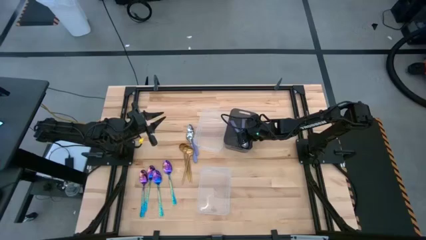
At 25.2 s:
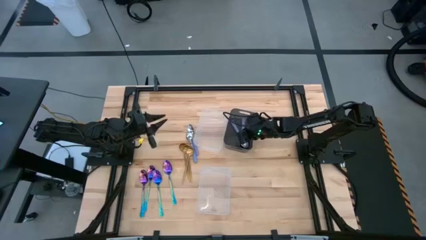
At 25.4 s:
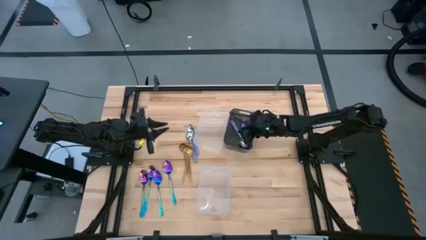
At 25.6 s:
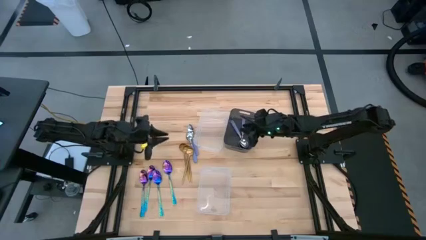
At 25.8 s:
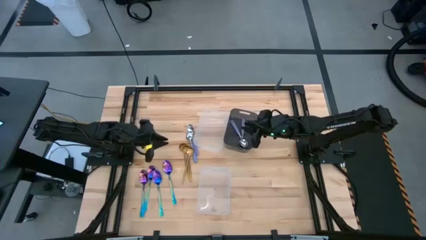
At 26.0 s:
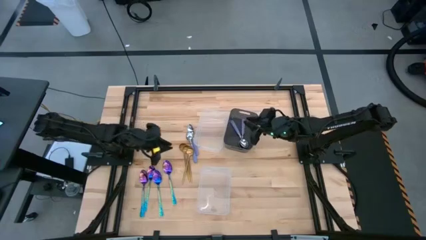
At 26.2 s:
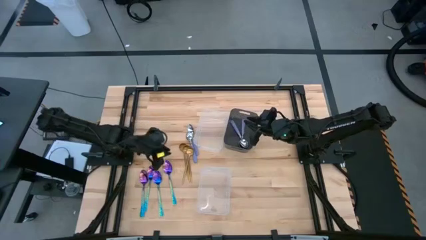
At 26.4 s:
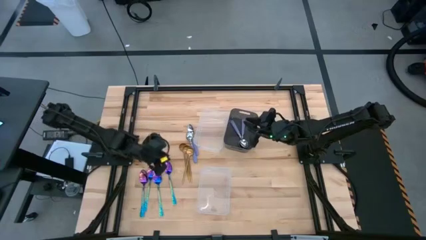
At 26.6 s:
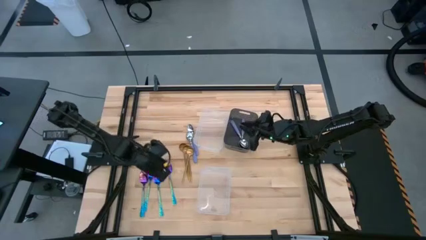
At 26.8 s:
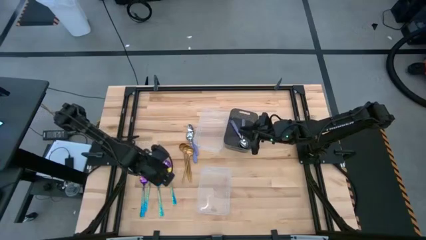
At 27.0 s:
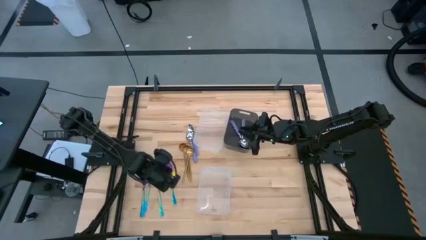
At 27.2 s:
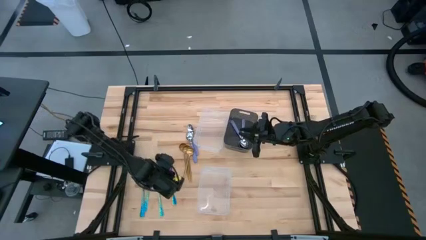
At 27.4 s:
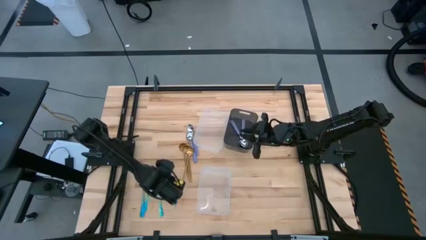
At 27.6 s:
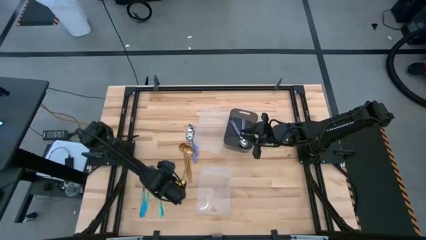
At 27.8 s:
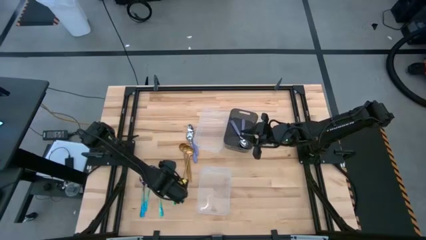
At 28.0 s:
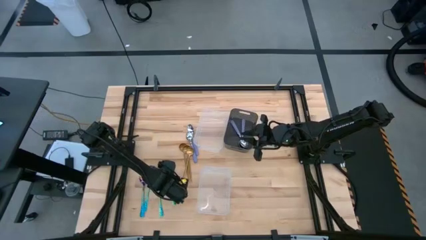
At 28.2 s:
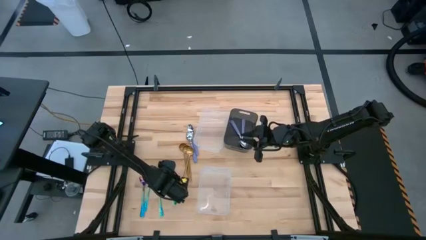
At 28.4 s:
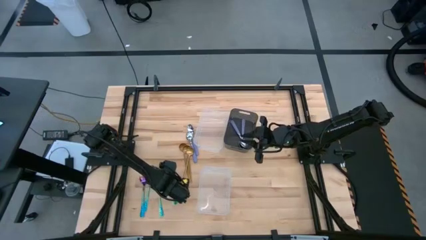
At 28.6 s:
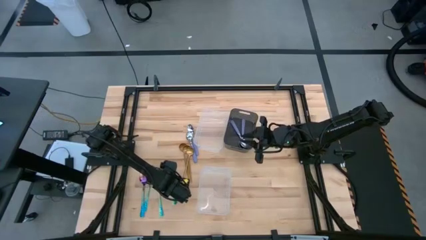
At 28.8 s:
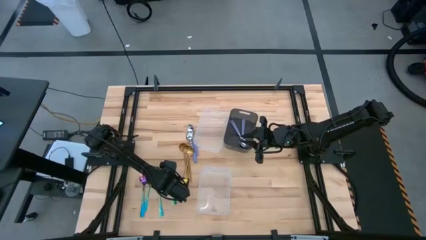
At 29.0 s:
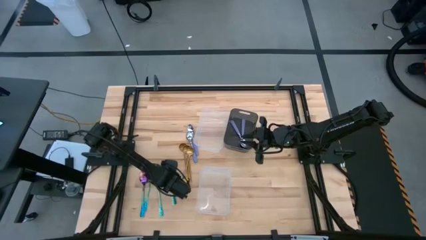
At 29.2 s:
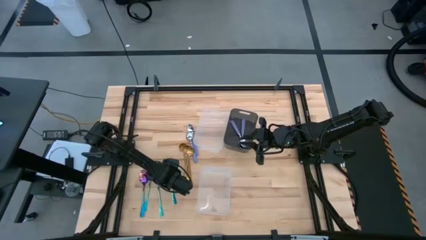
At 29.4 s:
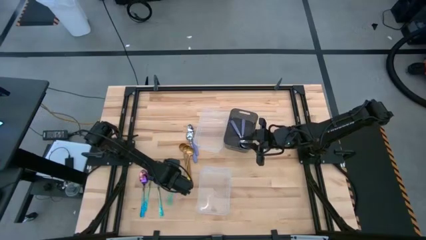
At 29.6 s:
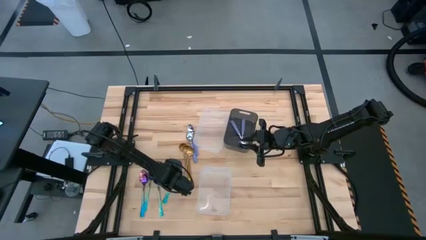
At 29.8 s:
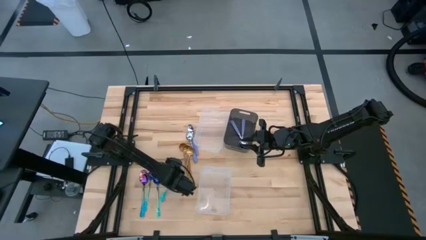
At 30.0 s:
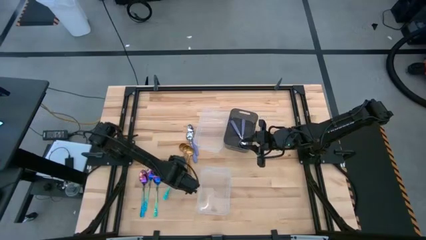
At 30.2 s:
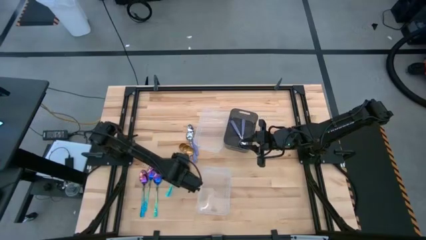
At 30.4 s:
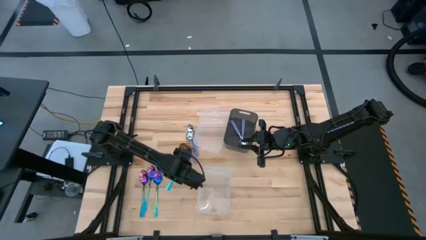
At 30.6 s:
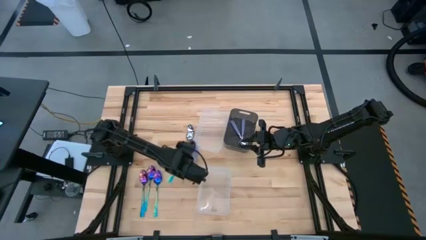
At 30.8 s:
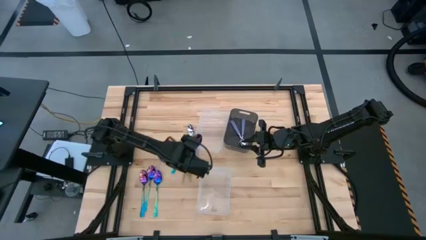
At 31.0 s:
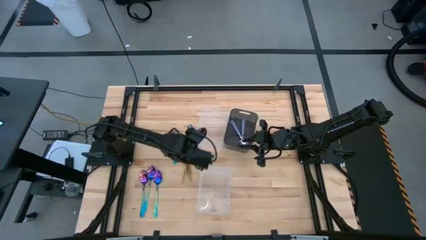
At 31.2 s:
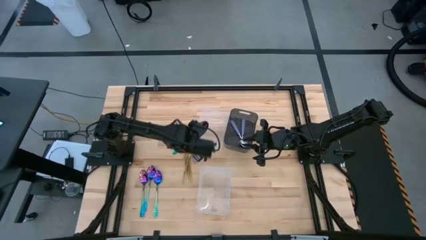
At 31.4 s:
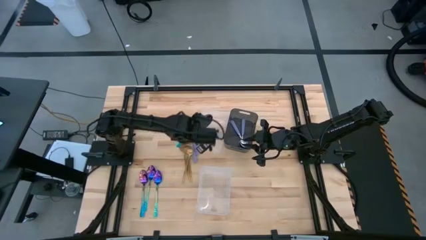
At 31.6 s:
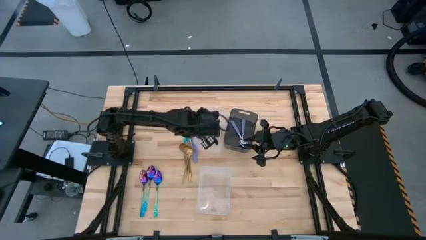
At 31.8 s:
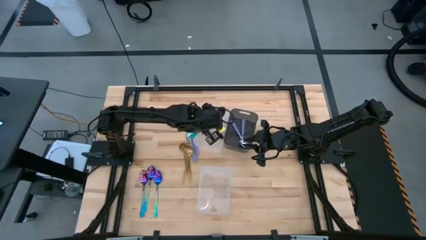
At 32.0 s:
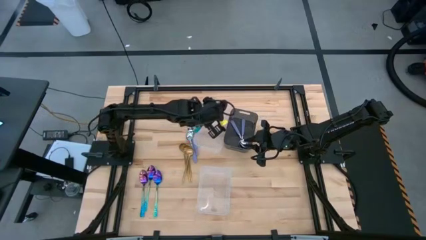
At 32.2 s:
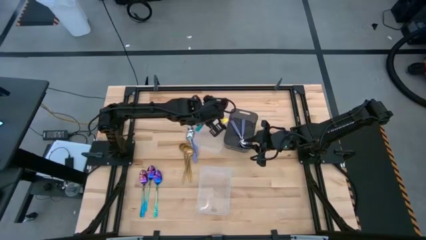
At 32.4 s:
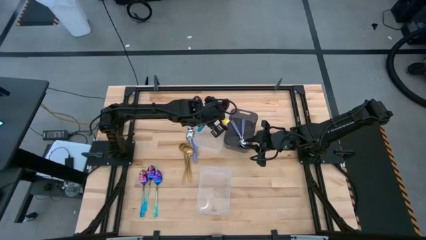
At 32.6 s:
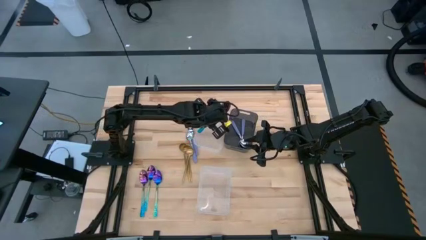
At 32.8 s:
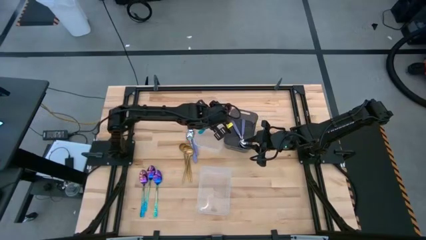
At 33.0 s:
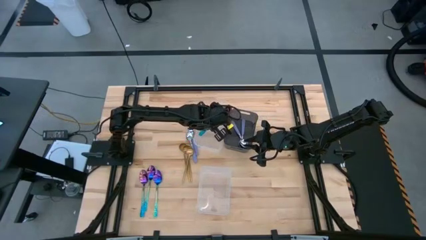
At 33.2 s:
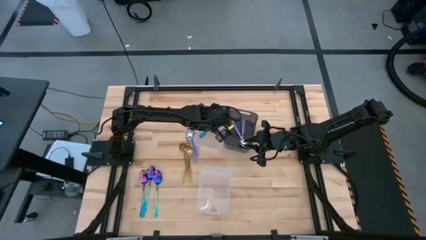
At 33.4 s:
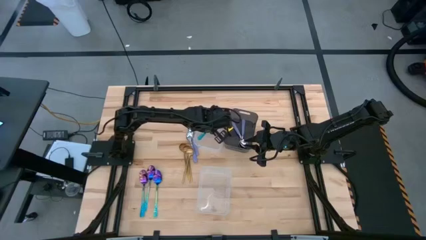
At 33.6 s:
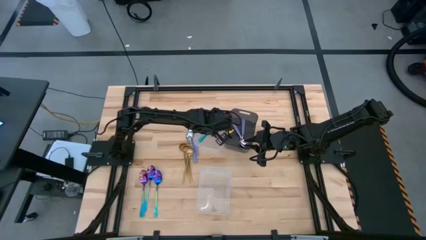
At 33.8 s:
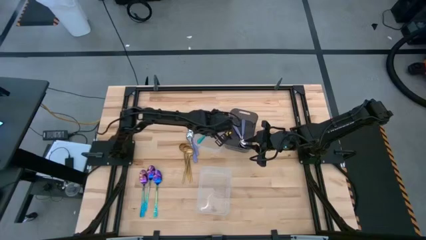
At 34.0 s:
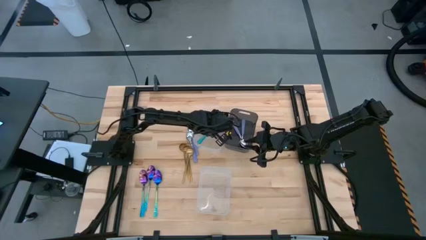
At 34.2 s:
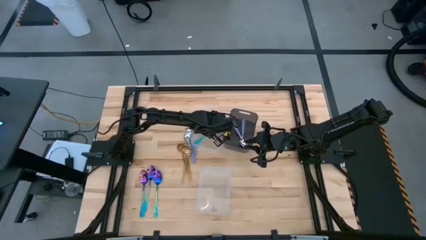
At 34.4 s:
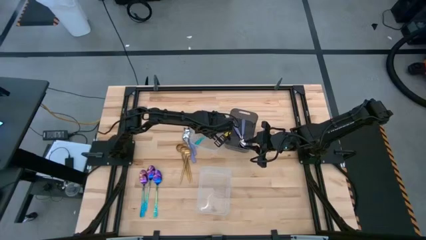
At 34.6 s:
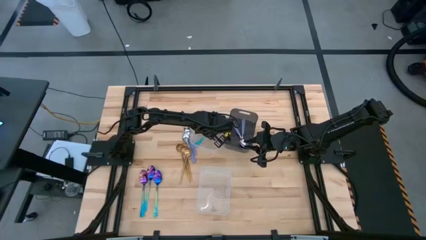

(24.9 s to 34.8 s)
Task: Sort silverware by color (type)
Put the blue spoon into the top transparent bin

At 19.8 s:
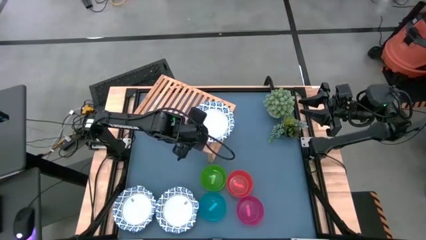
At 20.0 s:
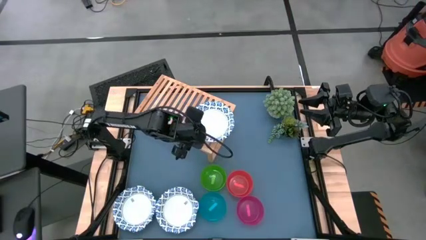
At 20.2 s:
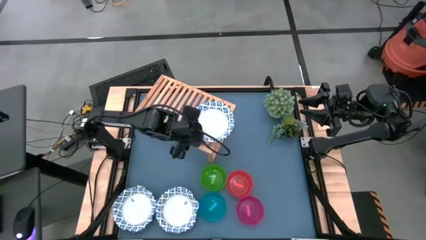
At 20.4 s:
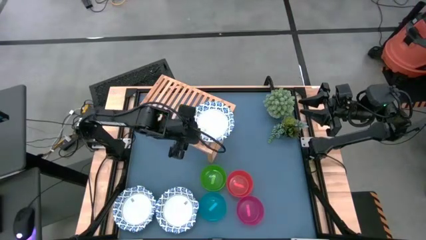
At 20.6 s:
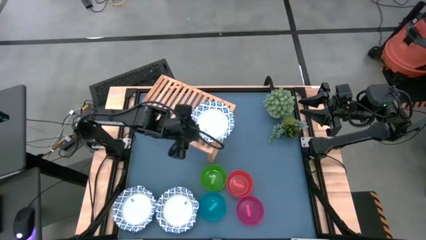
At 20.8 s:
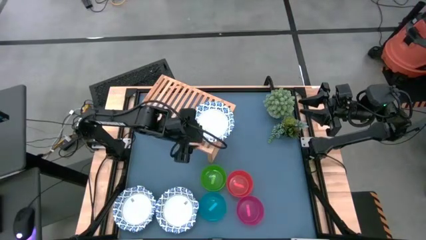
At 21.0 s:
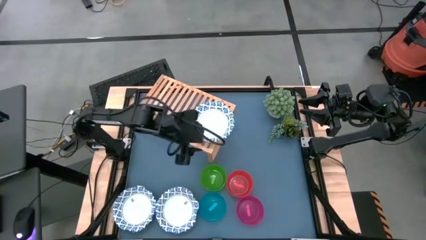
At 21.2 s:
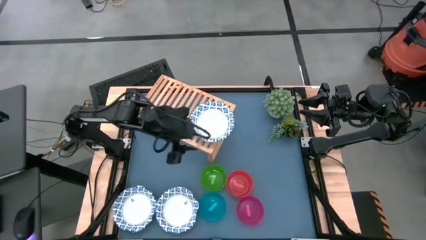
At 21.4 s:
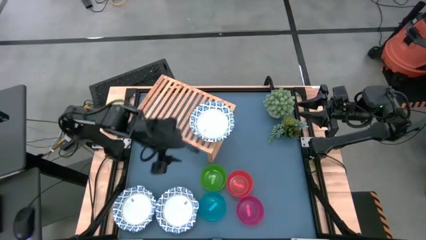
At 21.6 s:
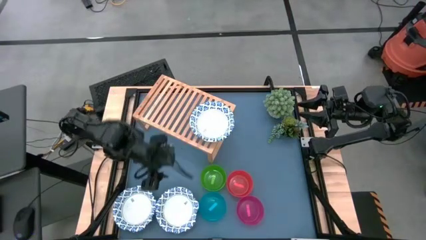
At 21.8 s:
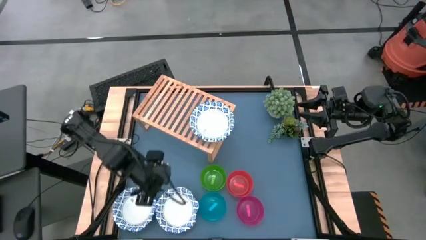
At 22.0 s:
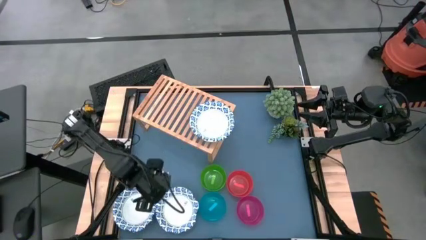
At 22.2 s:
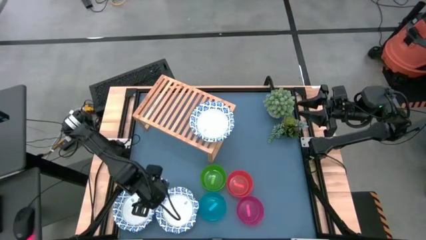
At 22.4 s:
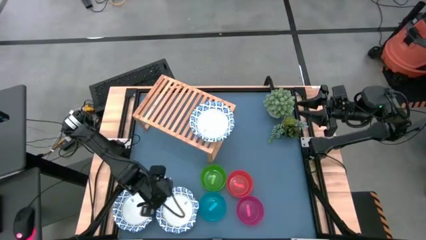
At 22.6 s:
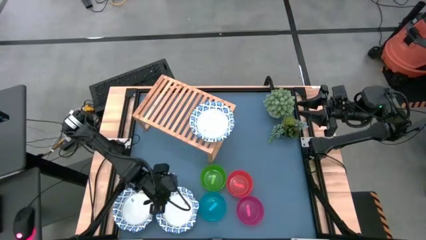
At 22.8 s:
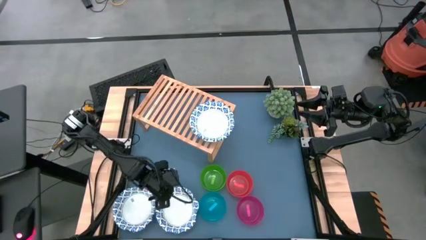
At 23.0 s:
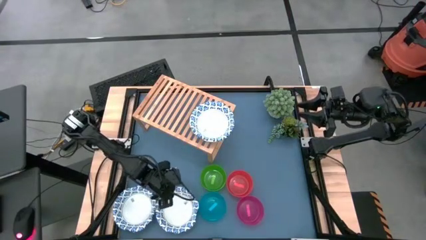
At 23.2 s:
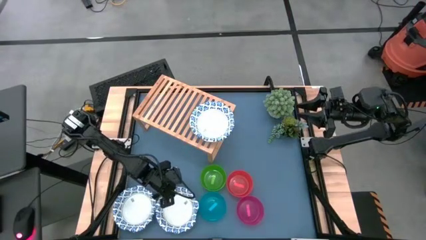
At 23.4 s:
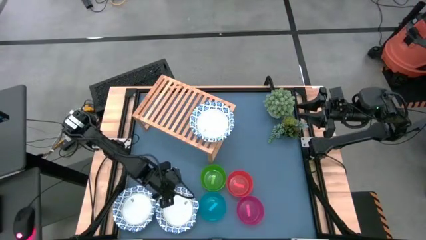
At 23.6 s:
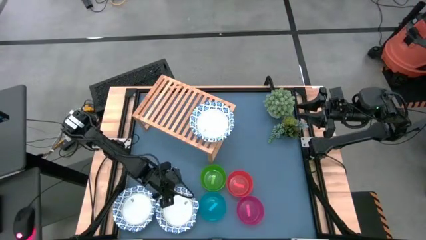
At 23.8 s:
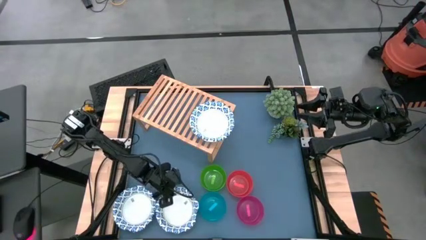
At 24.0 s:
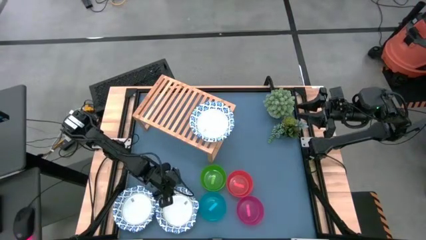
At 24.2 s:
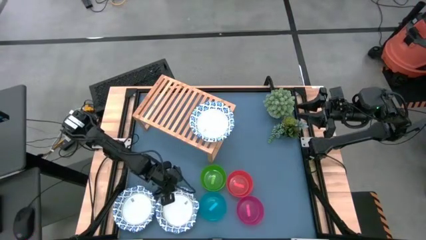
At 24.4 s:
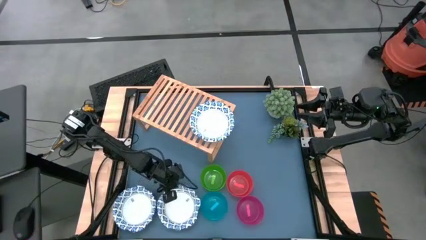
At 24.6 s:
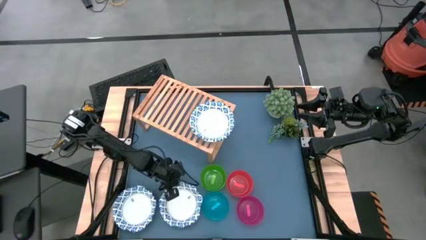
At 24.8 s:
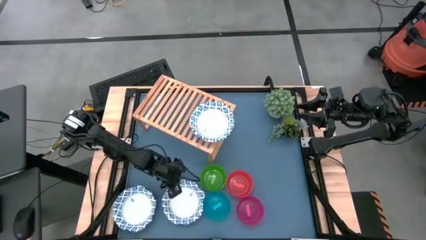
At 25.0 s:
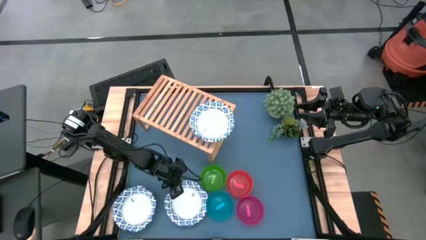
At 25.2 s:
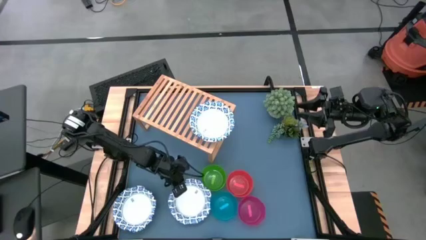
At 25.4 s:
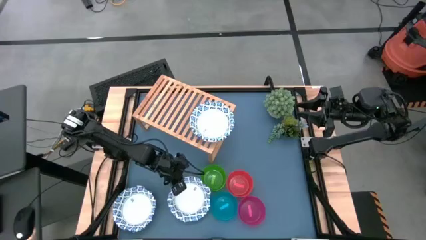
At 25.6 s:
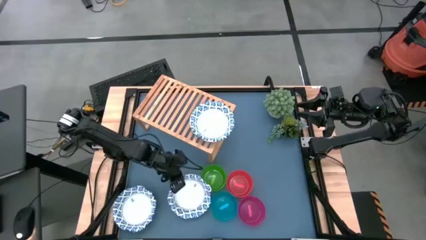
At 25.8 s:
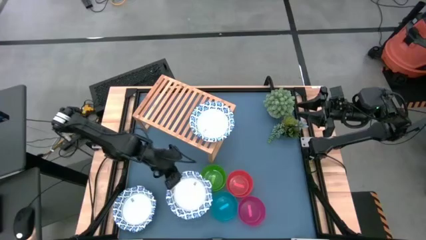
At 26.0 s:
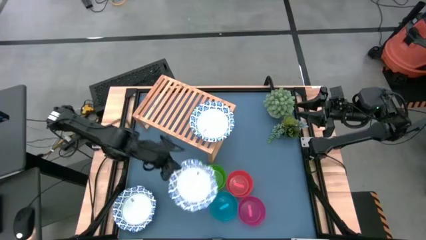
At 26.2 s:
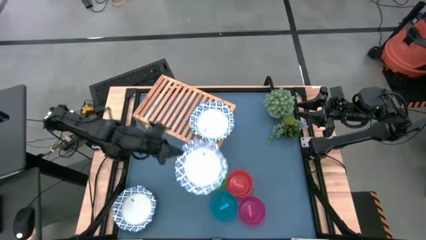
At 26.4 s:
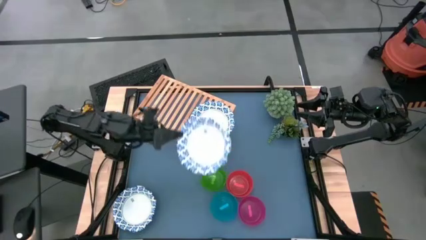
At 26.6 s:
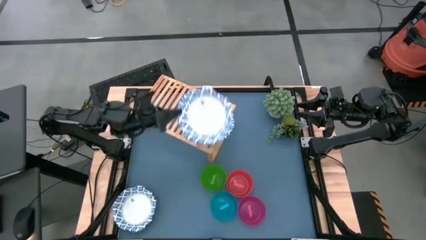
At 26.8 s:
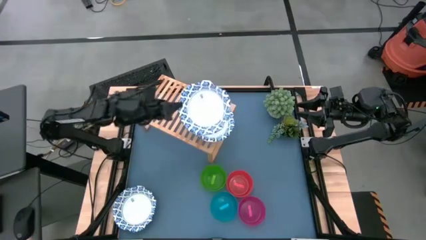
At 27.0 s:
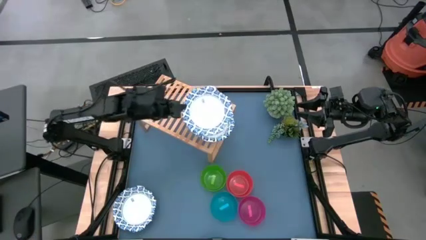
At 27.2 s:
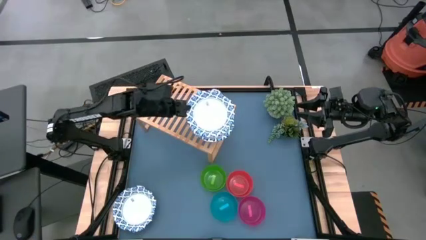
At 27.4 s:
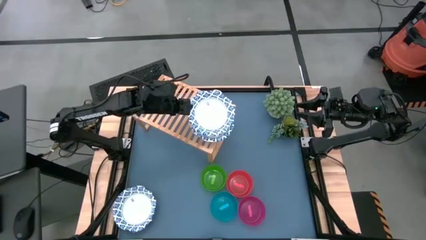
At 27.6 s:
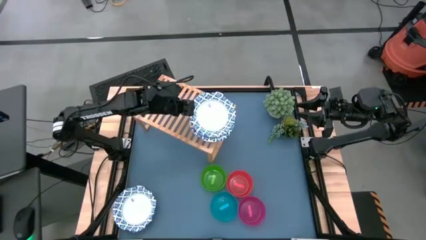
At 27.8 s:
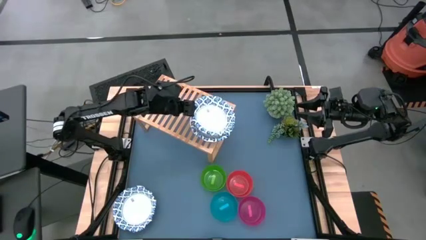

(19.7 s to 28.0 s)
Task: Place and stack bowls onto a shelf
Stack the blue and white bowl on top of the blue and white bowl on the shelf
